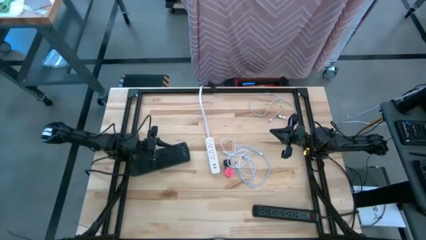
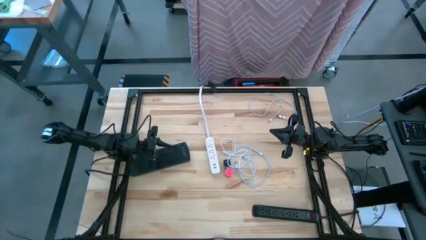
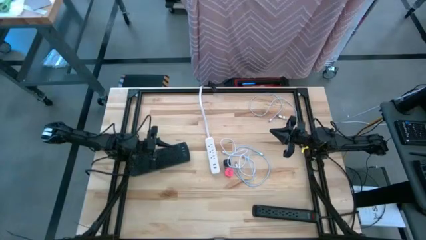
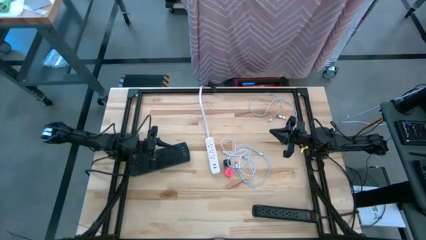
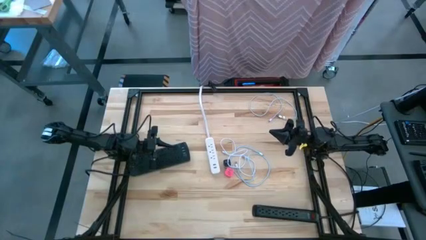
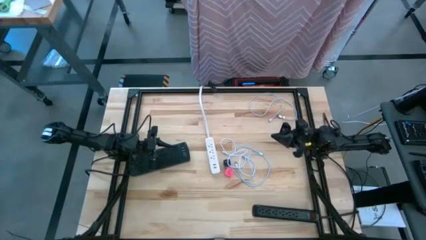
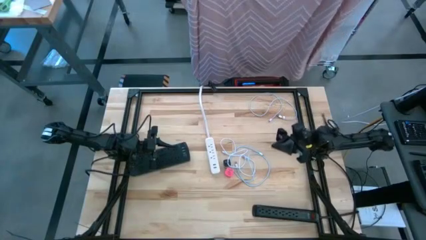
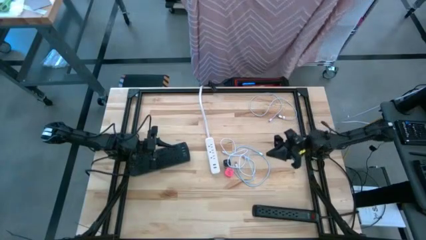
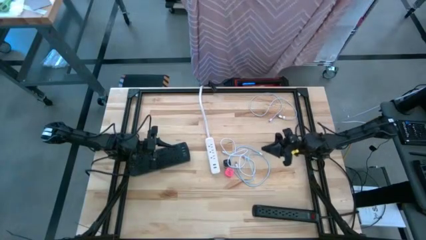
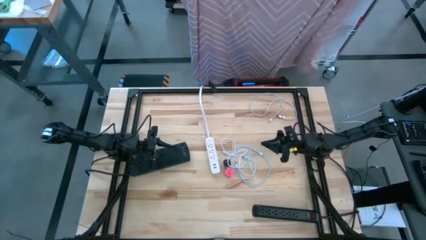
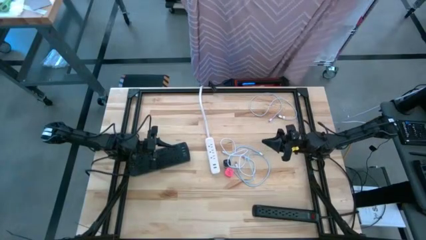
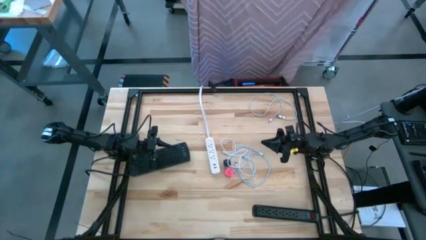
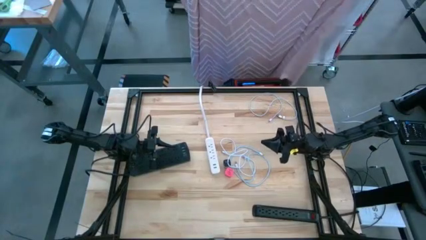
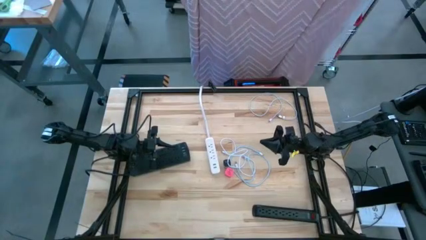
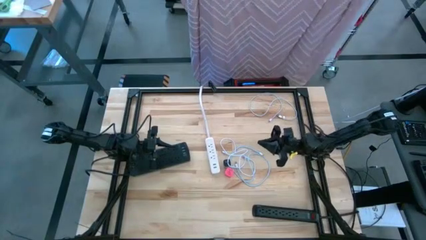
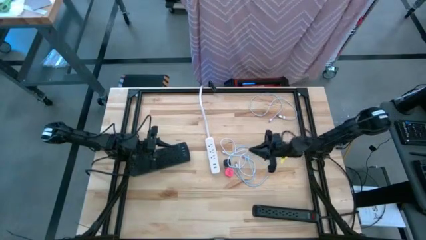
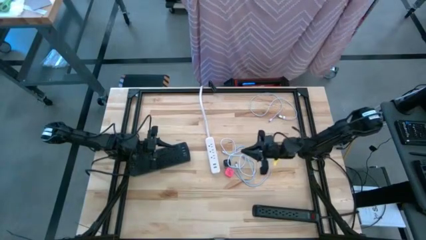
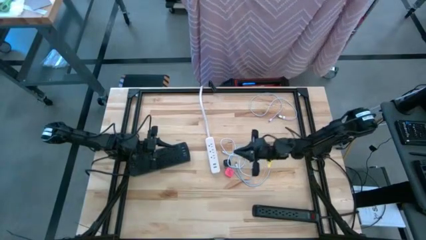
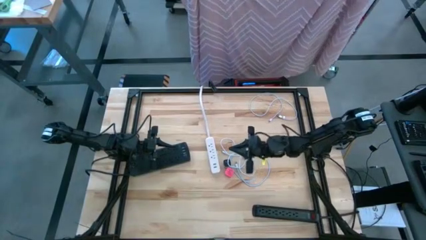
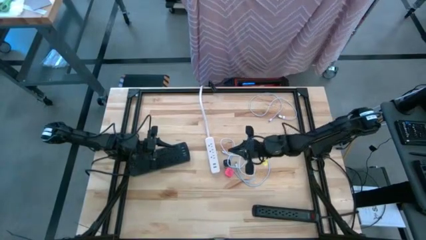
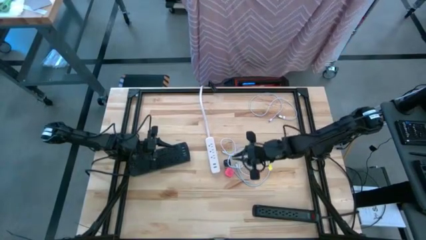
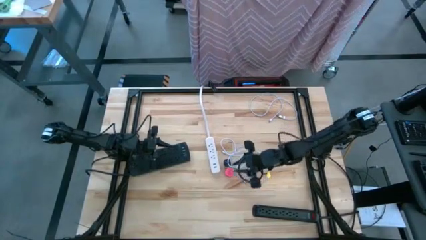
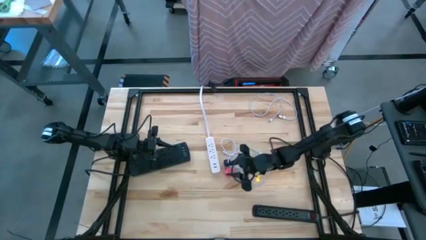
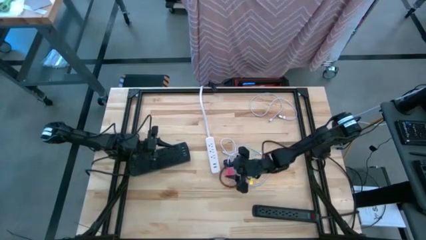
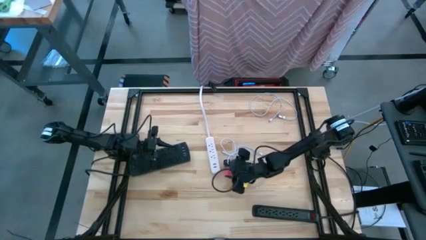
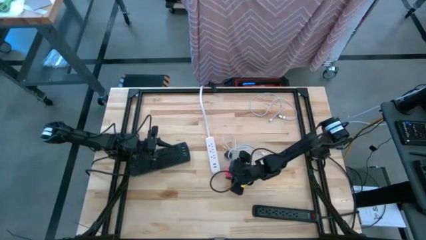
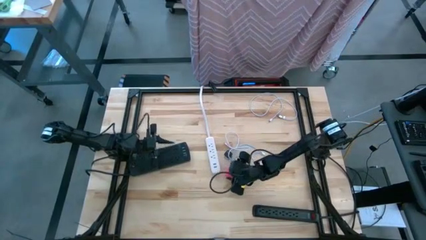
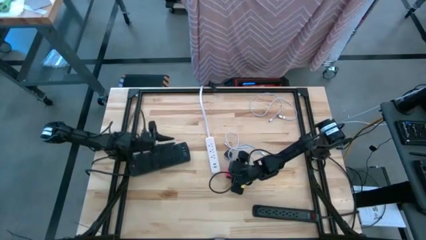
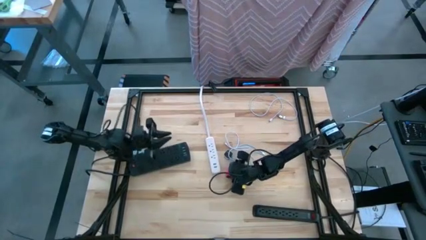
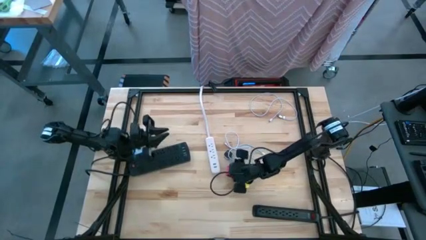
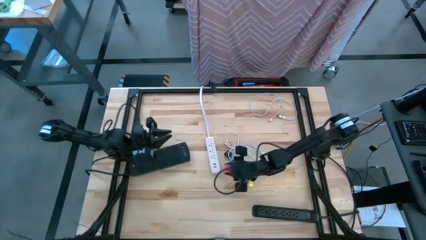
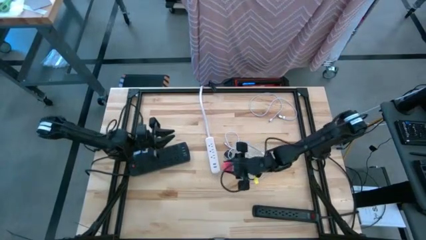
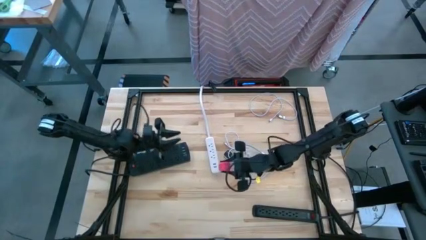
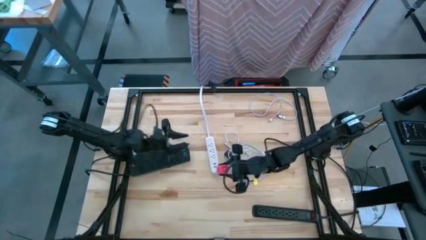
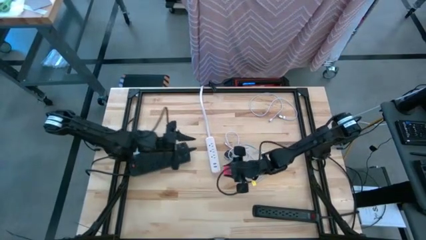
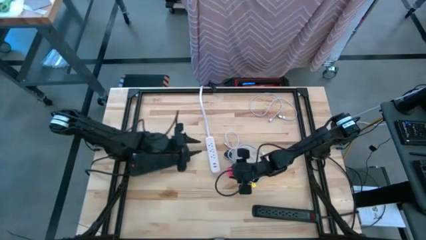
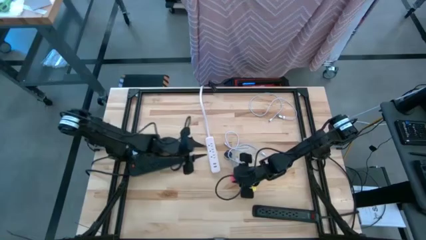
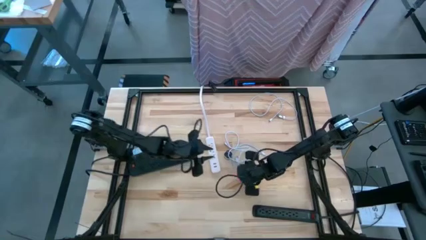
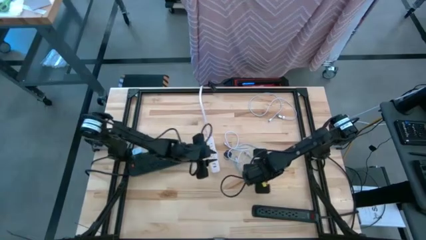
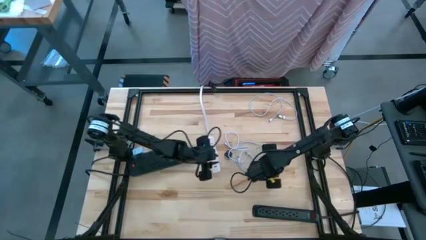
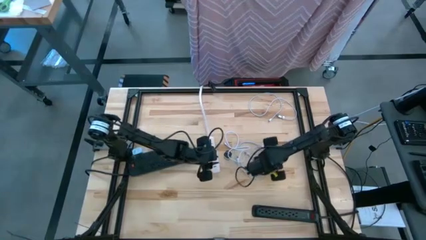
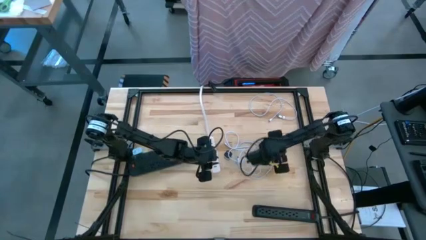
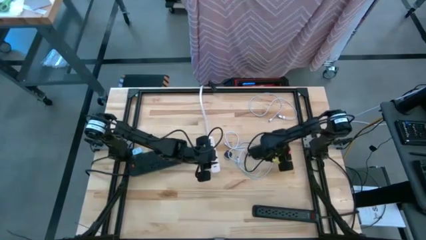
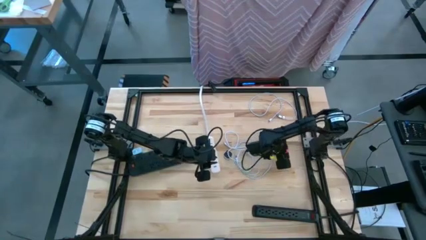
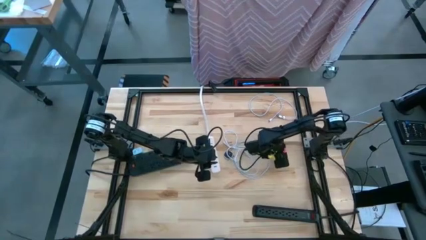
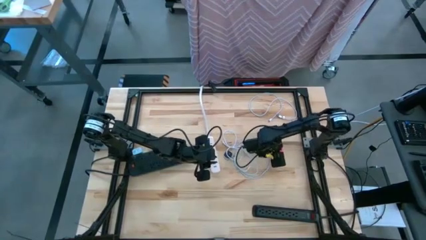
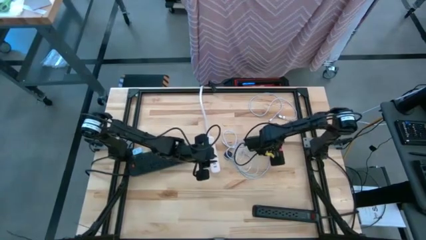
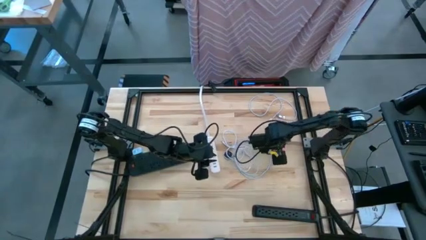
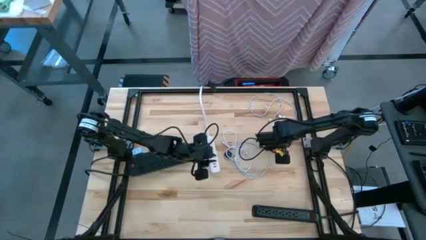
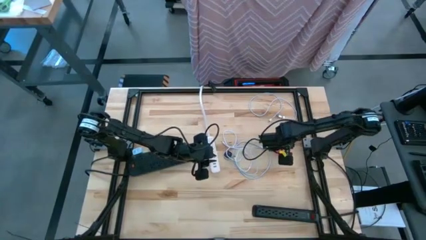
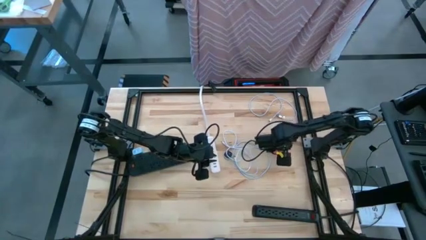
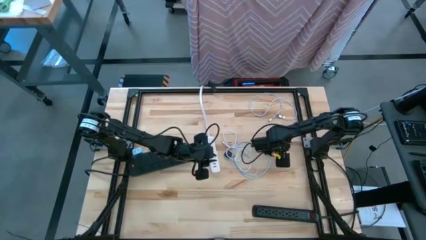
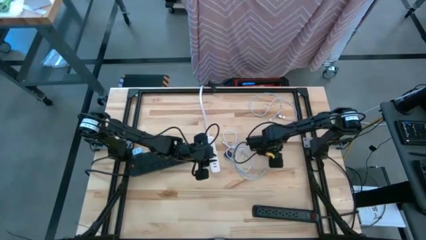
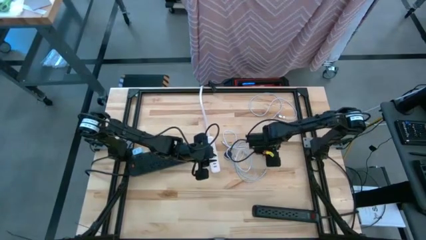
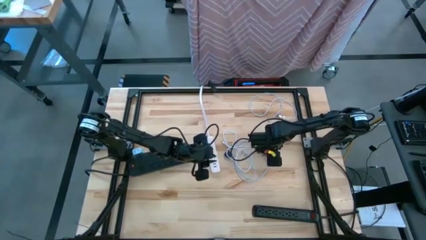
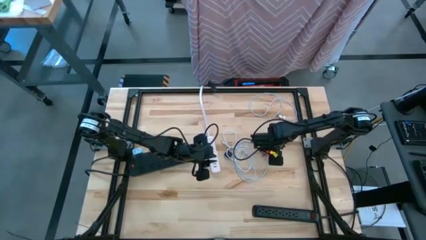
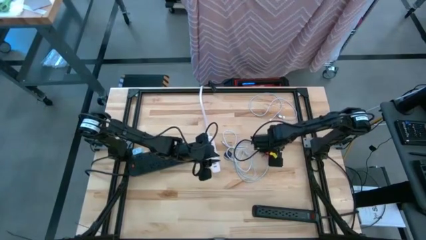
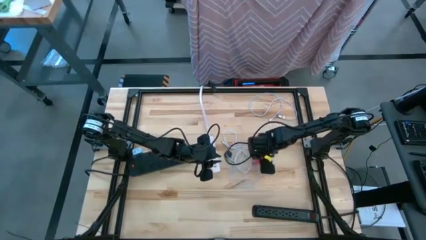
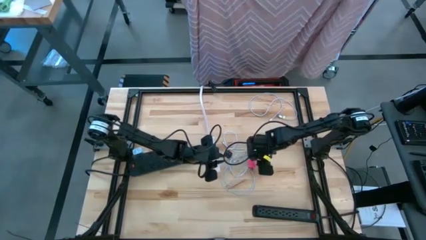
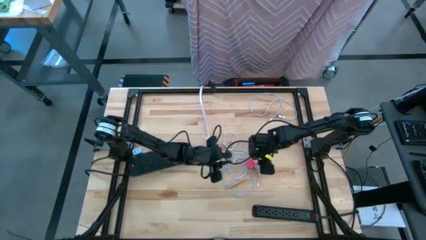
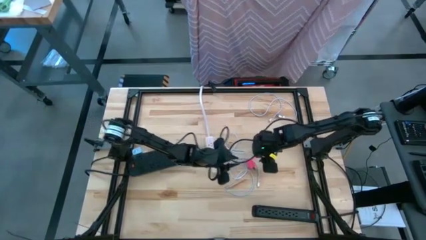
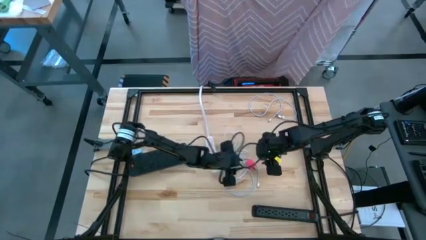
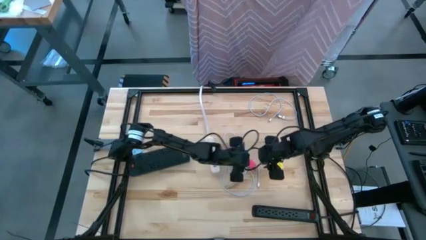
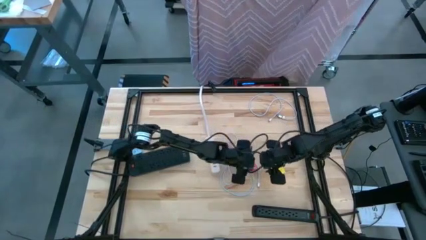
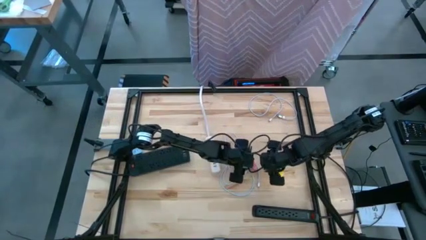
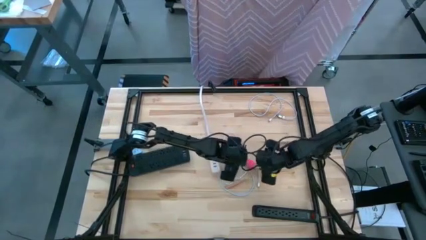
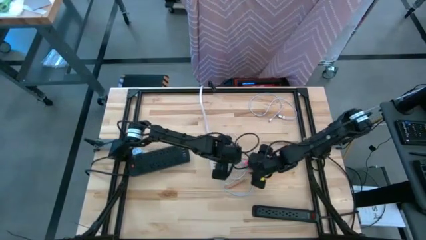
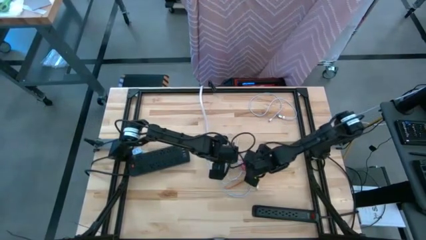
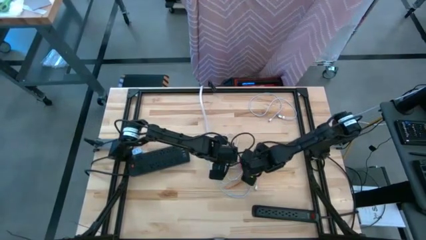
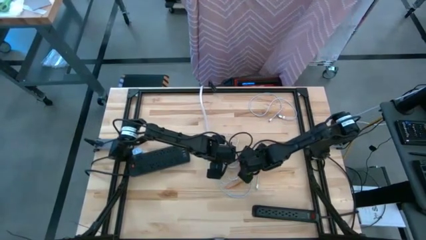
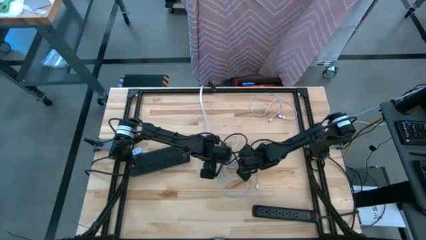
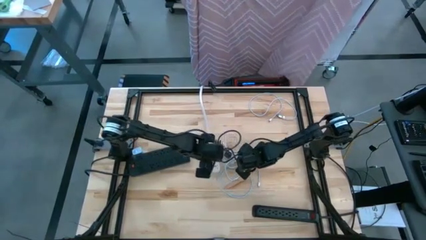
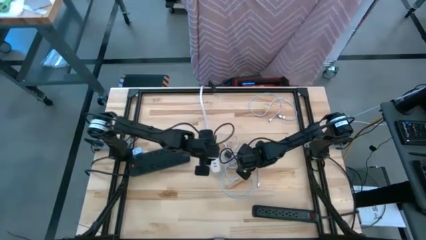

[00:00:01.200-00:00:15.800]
Task: Insert USB
Insert the white charger cable to the pink charger adapter
